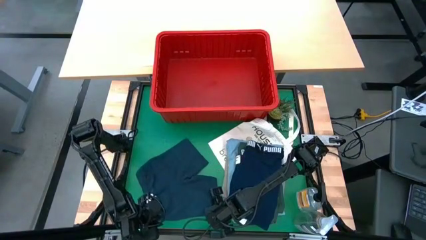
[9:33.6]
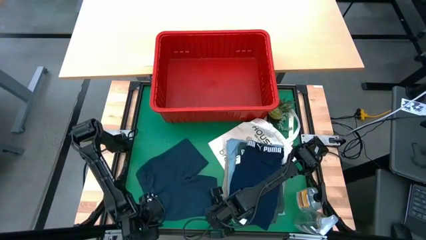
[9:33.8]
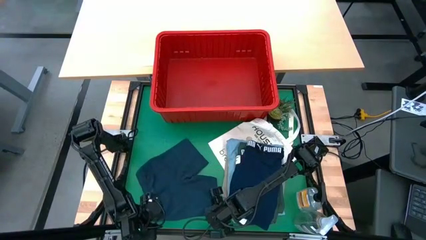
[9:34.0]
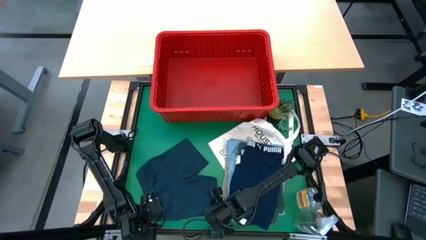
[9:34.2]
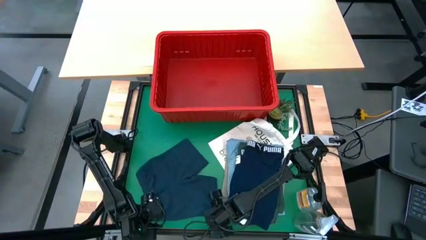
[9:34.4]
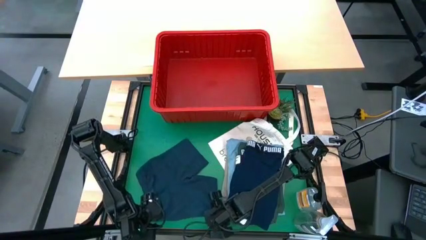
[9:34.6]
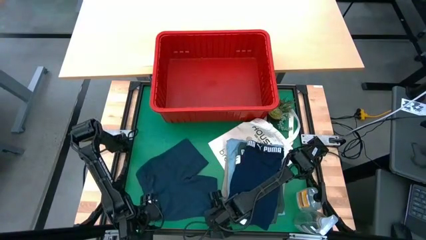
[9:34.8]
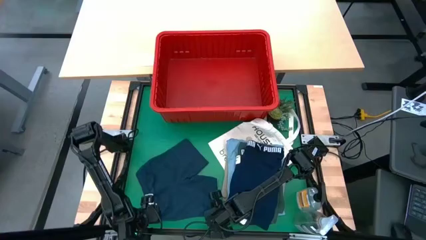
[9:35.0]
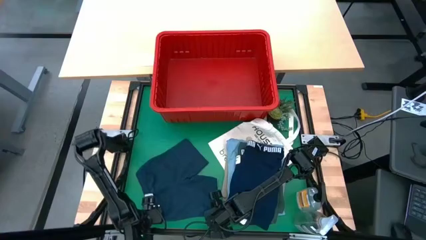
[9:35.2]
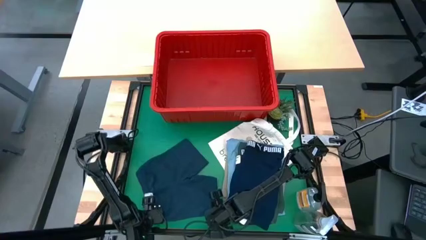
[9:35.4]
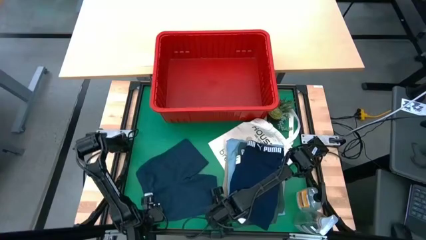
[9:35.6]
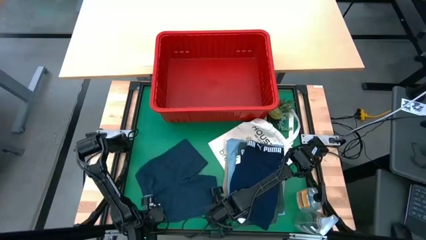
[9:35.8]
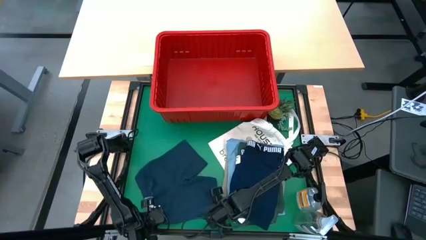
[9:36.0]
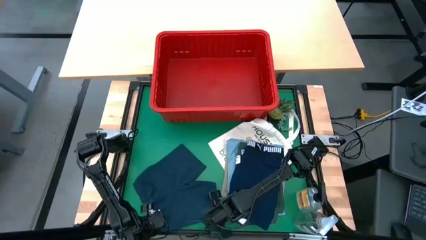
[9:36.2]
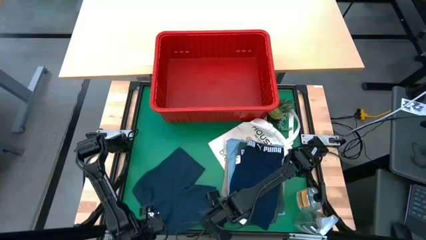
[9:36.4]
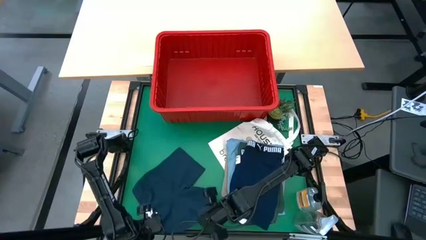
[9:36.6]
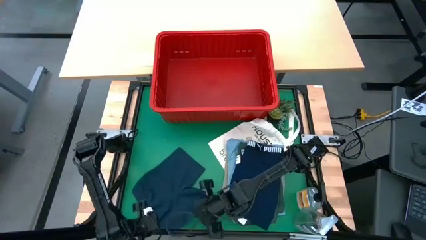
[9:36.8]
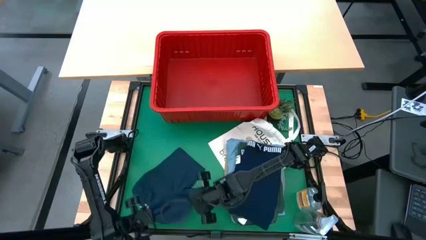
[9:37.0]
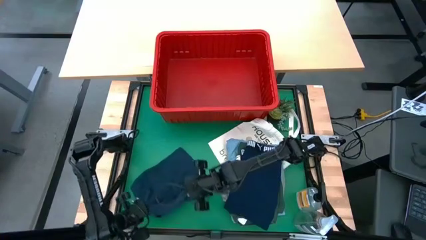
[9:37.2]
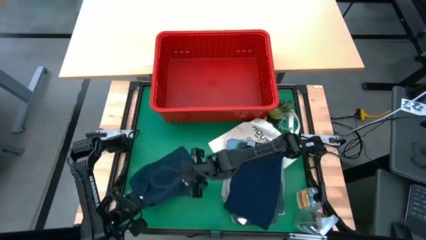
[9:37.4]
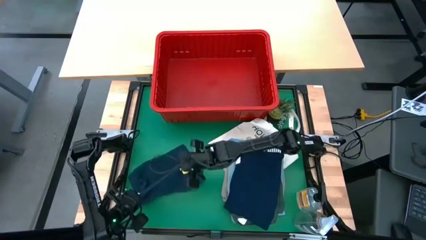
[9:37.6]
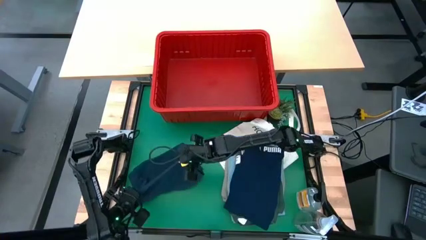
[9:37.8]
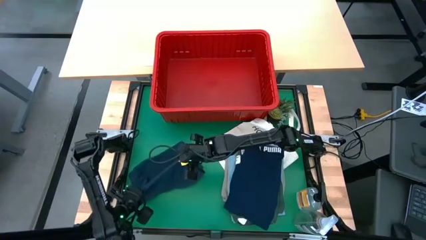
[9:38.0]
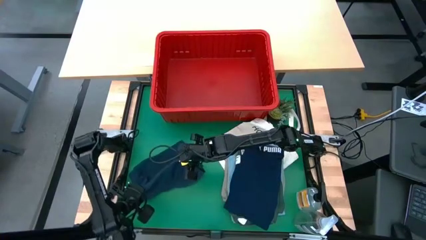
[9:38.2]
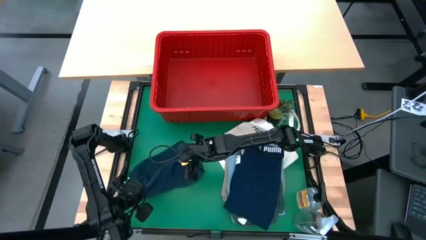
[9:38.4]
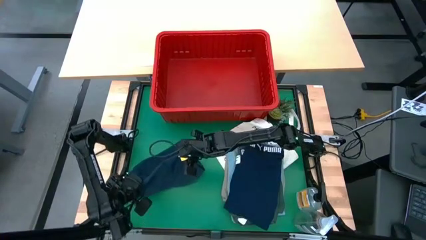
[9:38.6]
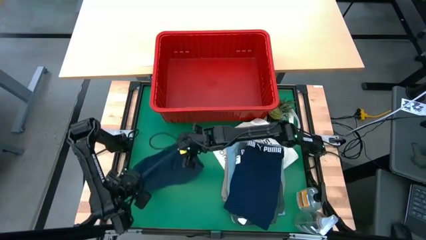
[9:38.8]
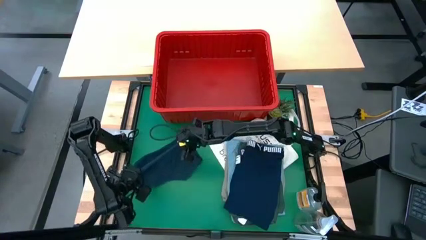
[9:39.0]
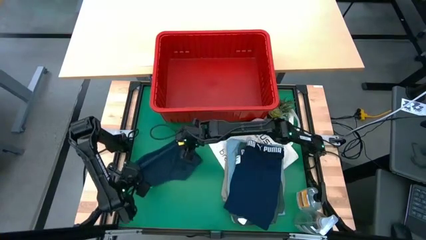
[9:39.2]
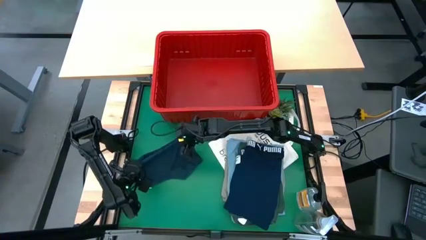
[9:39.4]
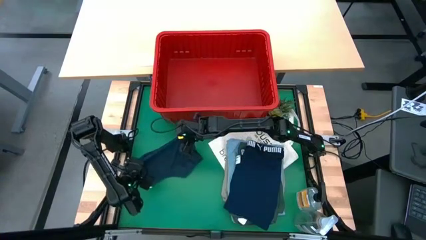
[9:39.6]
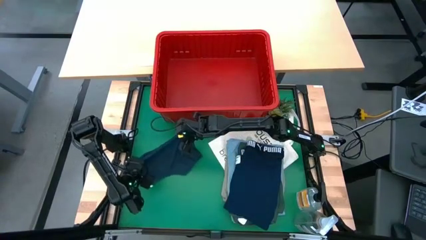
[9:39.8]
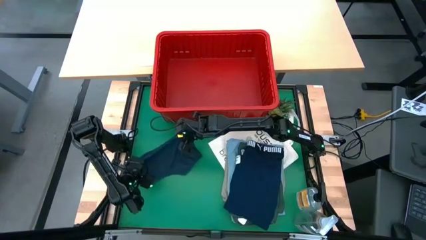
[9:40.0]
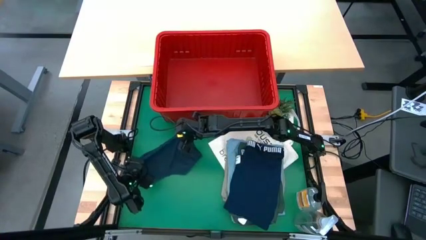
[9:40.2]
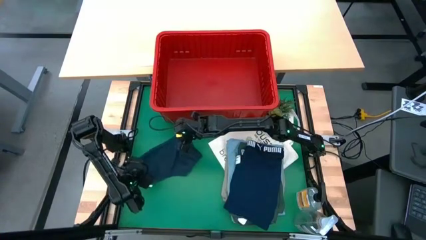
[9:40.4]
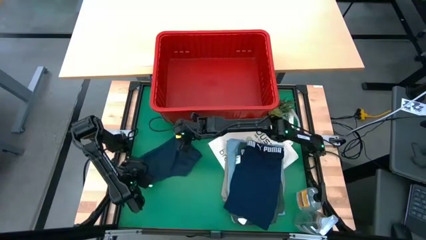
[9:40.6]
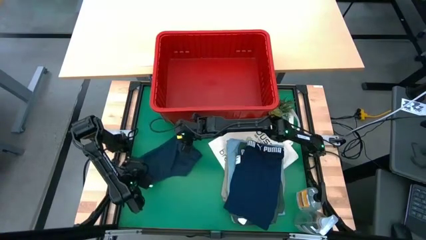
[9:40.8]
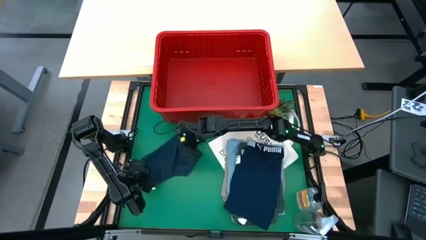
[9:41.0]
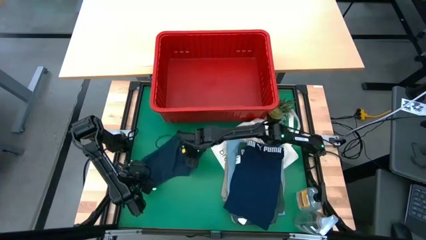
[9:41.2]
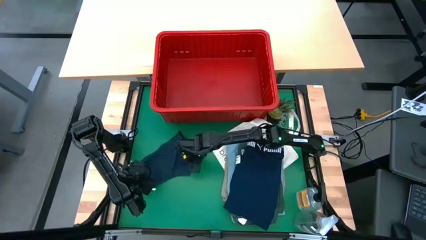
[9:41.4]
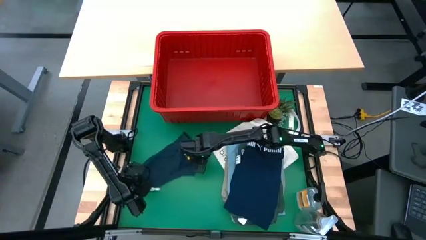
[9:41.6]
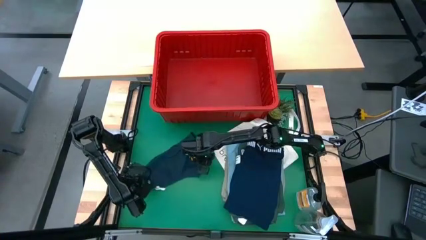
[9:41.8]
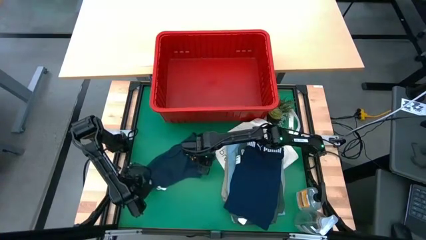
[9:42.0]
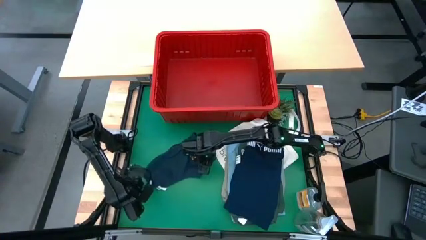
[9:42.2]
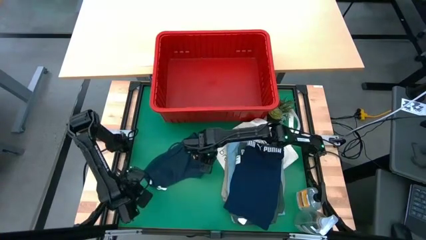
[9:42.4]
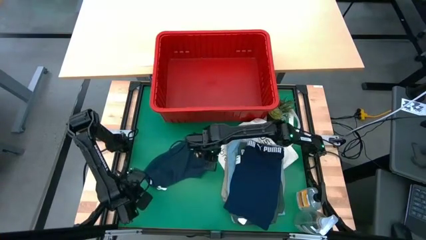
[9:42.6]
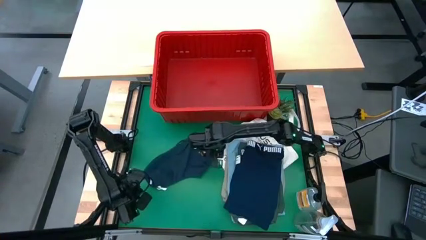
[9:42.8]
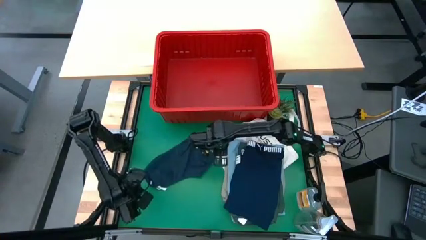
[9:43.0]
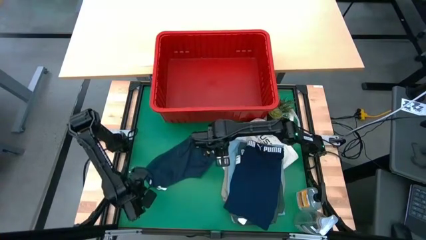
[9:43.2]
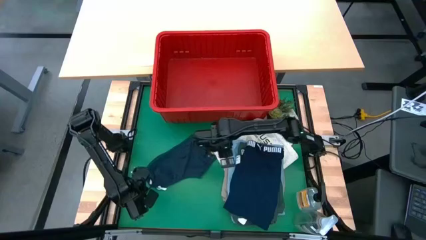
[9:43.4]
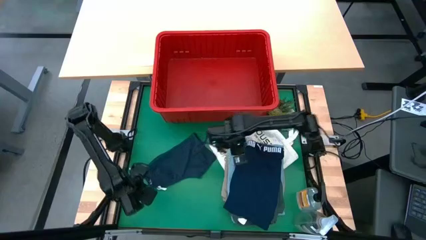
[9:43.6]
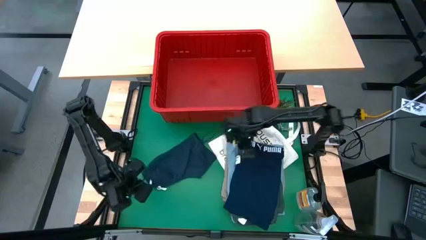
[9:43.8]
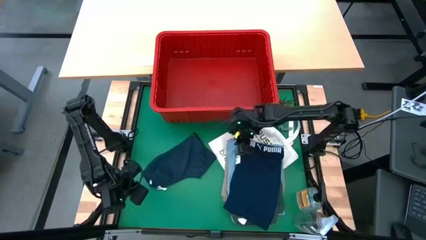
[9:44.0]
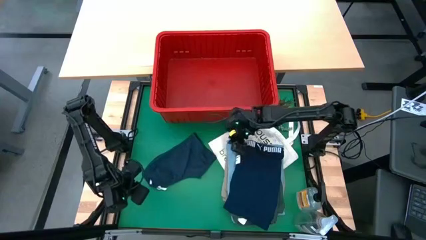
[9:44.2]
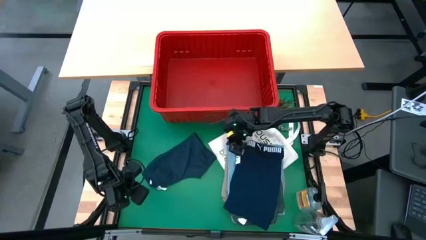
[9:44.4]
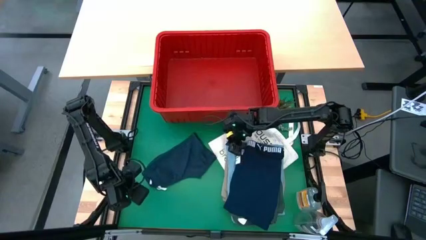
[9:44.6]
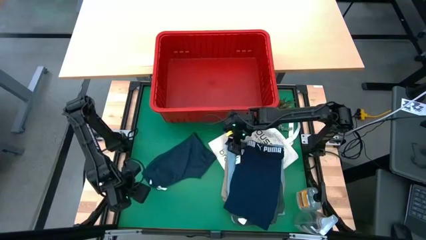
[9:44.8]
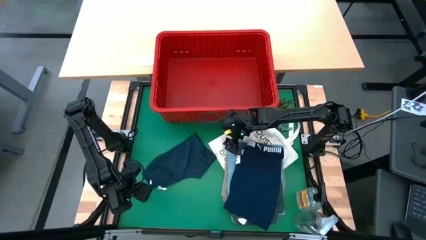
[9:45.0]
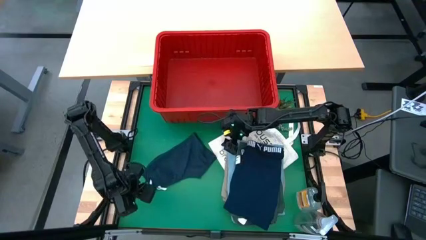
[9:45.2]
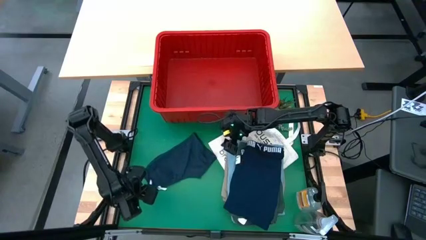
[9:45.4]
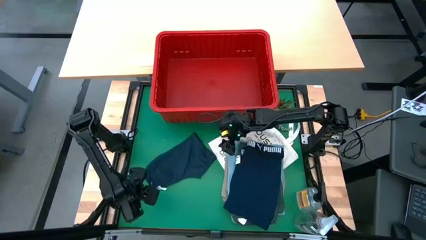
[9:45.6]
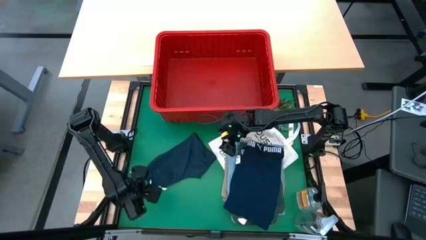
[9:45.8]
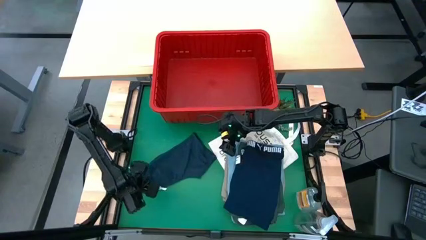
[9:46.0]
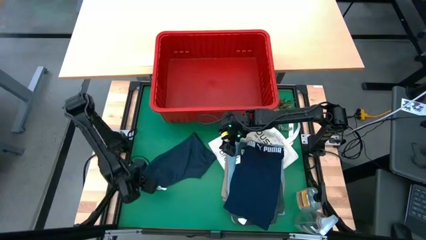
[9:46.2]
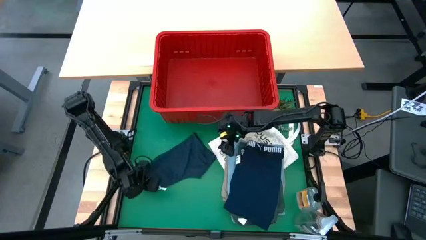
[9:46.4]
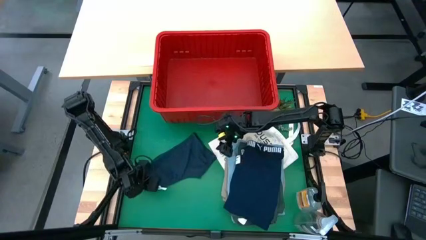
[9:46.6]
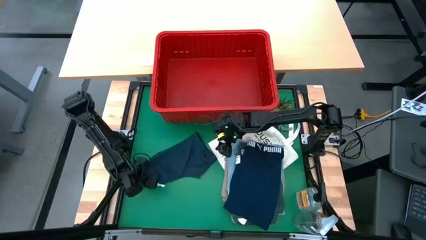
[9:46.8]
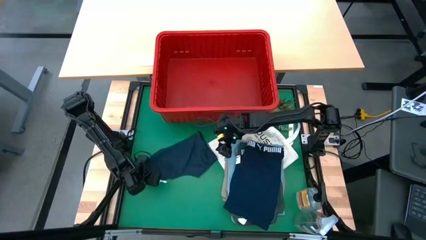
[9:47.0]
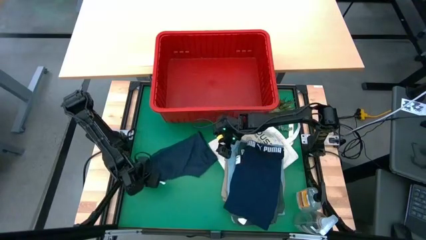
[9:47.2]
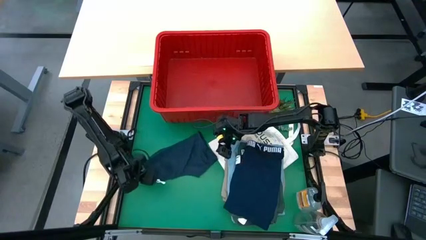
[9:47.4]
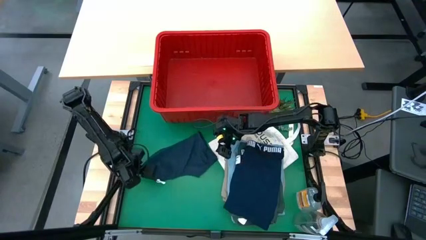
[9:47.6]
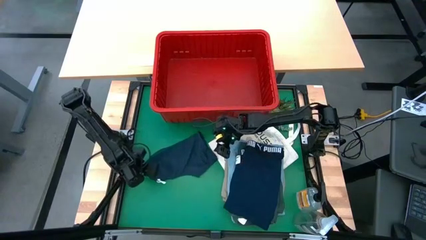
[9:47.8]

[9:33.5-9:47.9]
Task: Fold Laundry from Bin
Fold the dark gray shorts

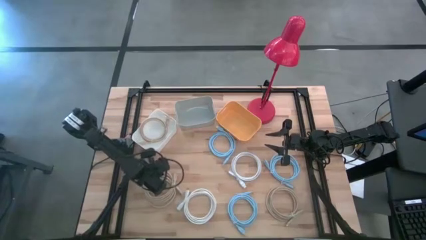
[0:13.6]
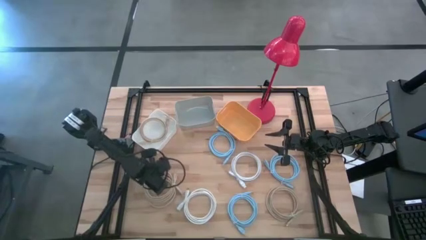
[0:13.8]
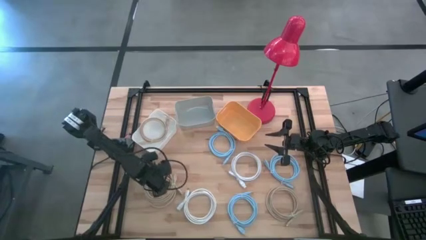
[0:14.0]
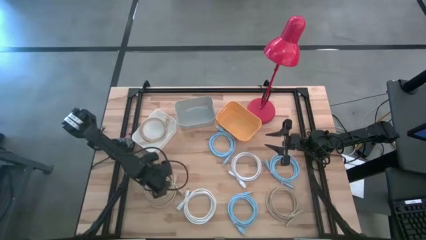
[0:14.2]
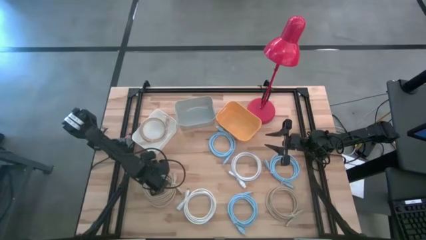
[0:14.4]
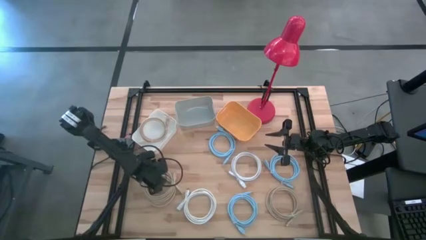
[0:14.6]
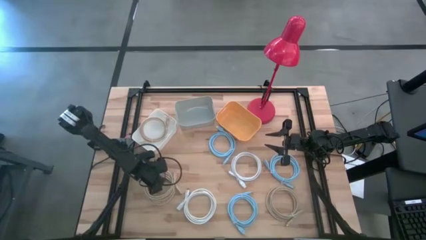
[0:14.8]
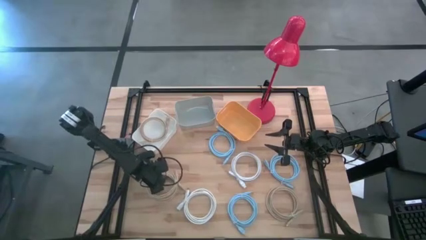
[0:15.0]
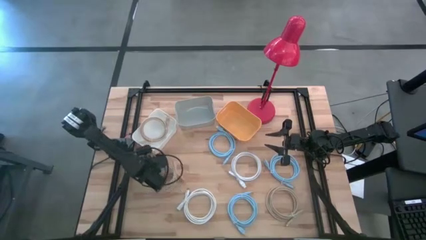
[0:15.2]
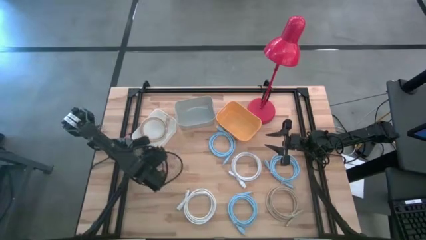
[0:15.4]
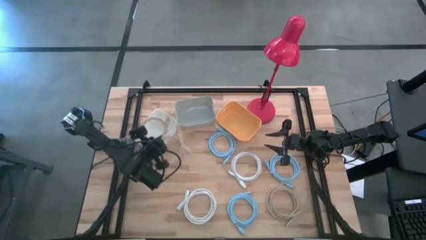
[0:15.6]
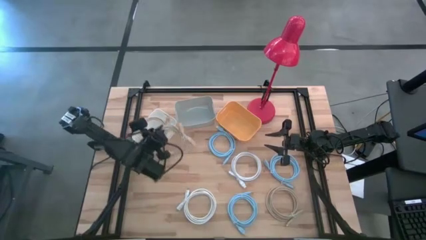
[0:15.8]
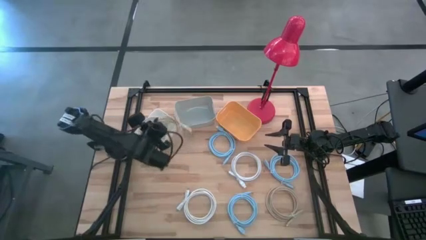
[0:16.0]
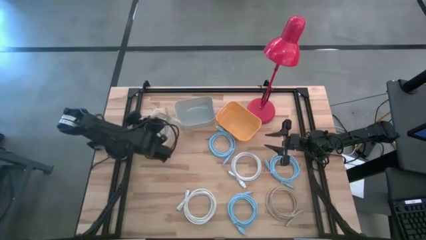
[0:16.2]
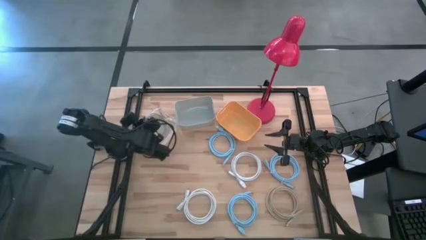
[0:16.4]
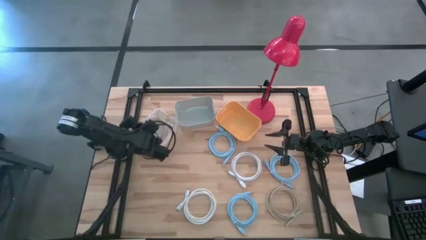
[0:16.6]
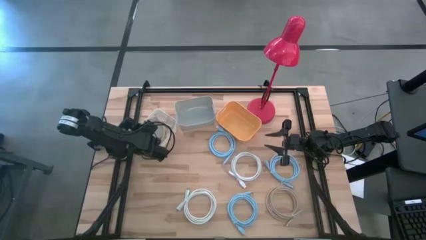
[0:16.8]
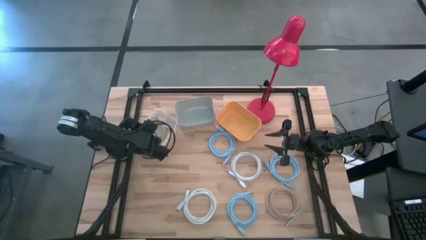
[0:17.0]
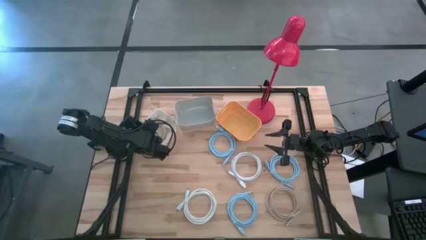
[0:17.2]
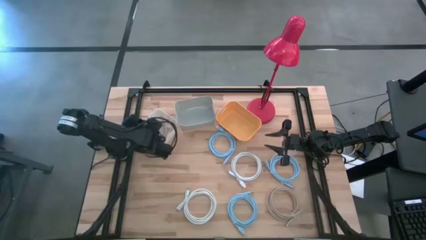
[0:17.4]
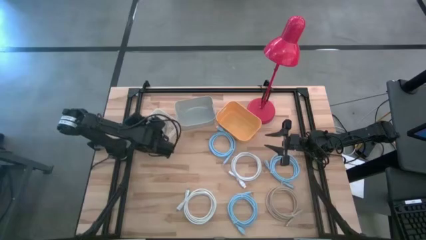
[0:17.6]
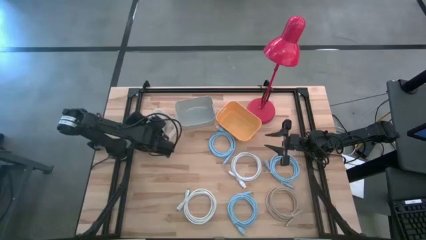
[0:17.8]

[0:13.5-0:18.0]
Task: Sort HDMI cables
Put the left brown hdmi cable into the white bin
